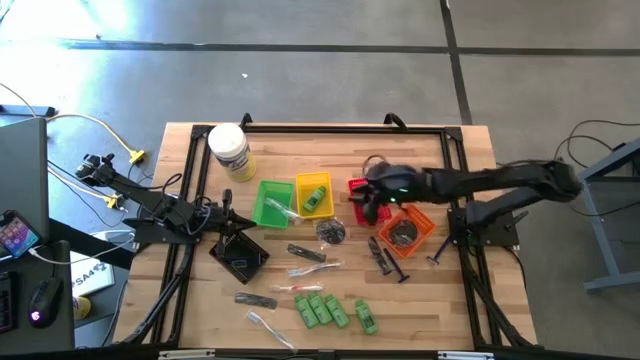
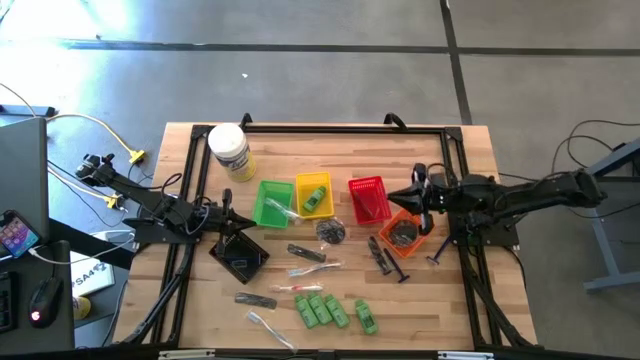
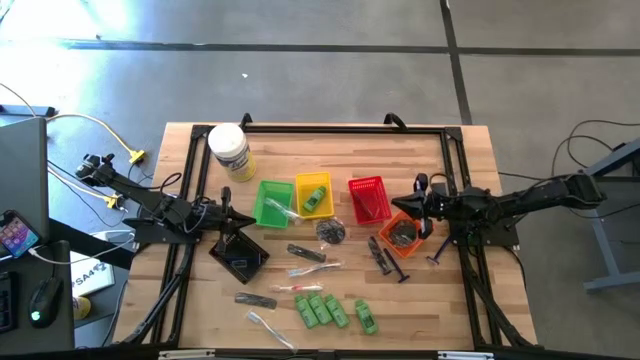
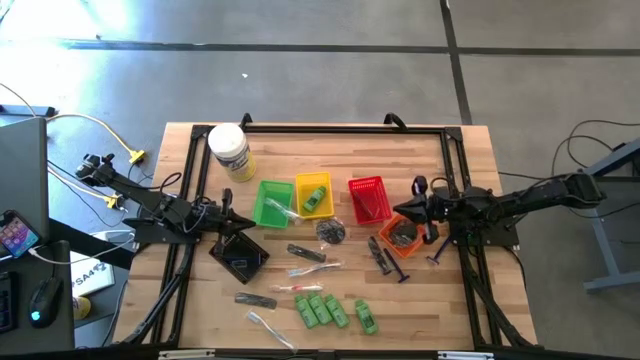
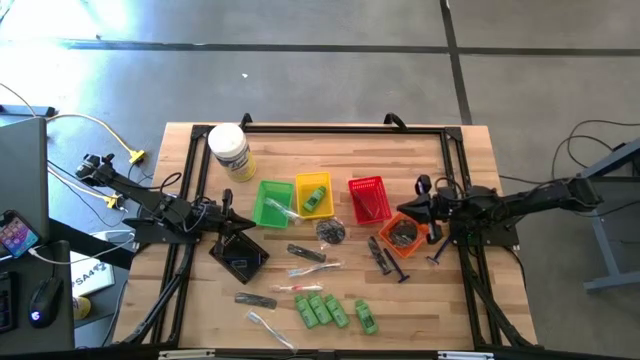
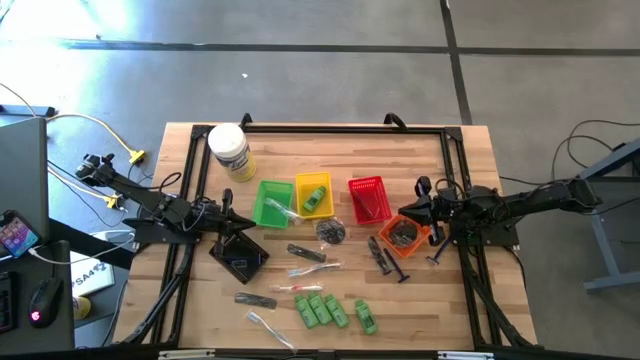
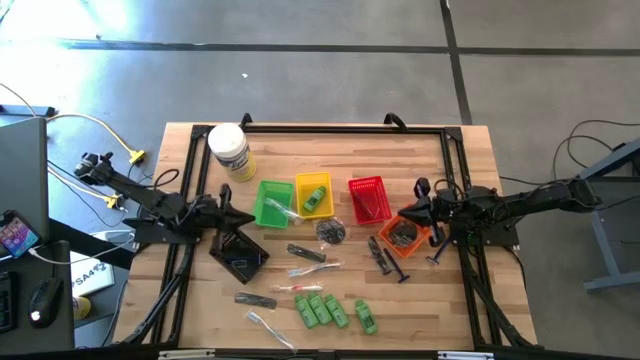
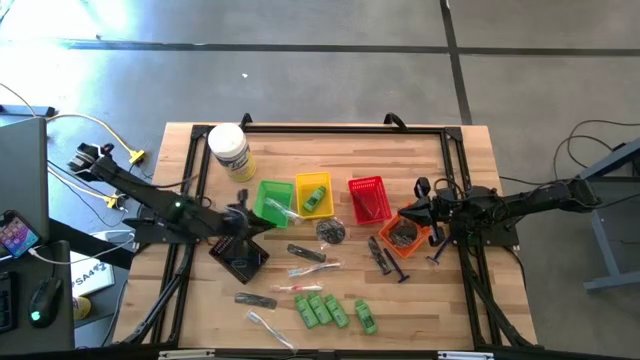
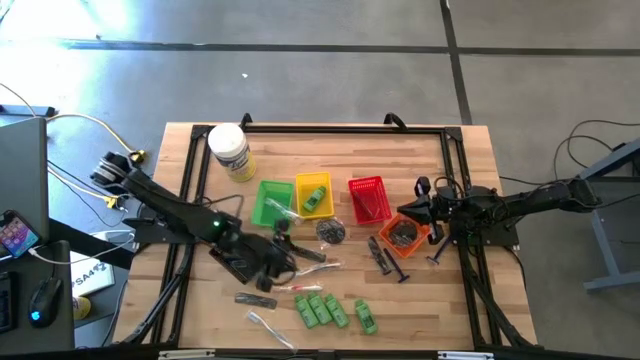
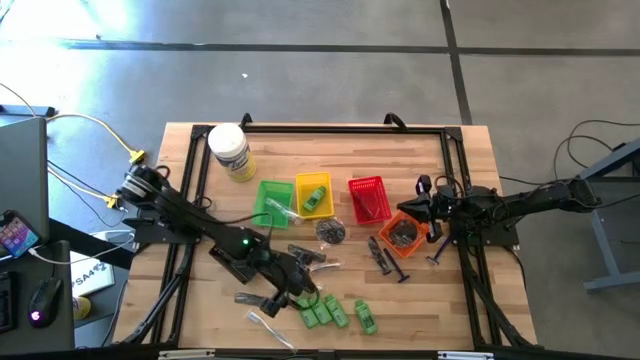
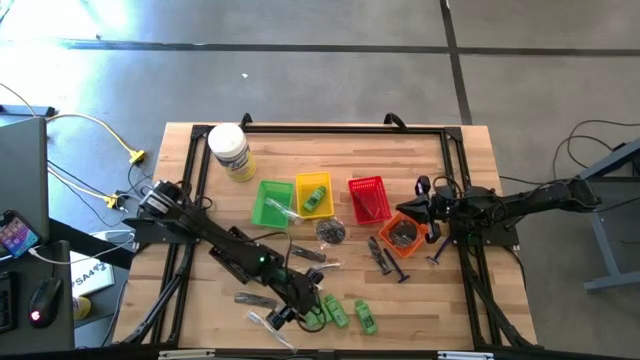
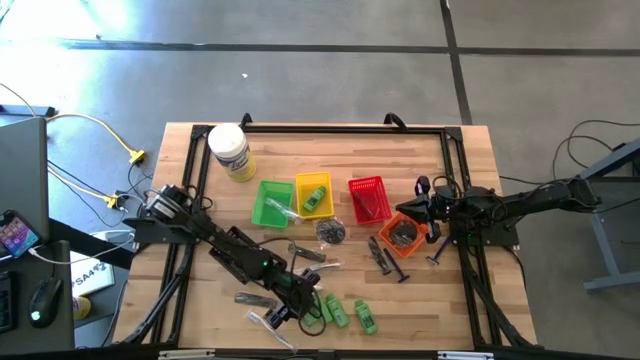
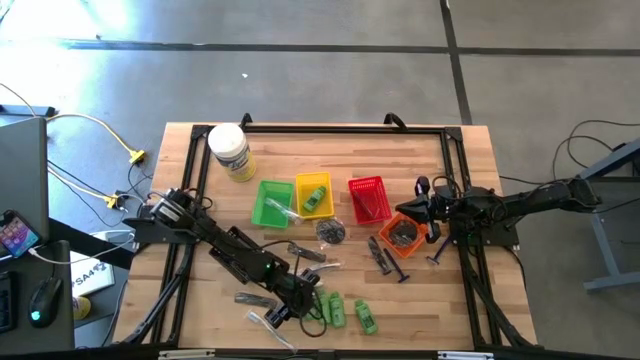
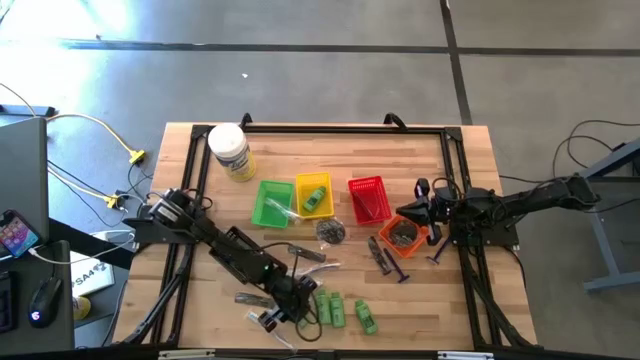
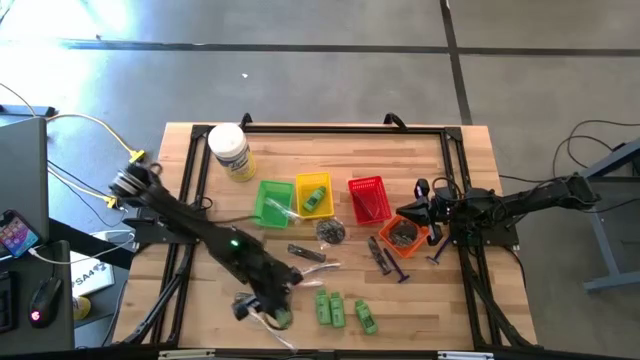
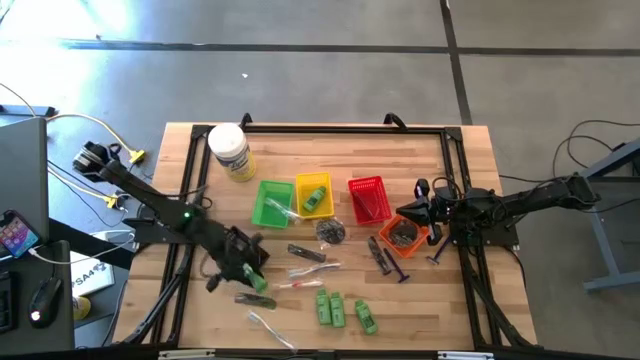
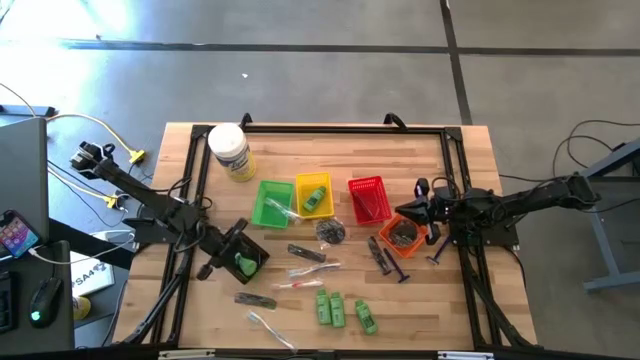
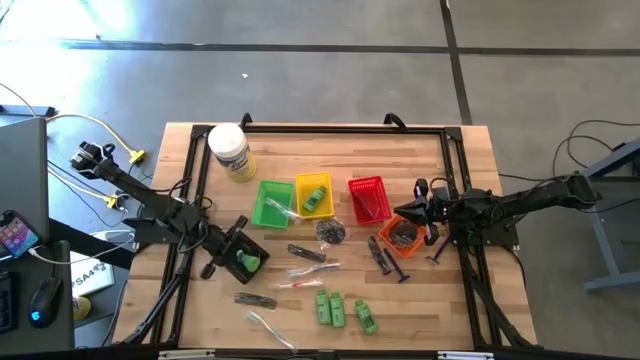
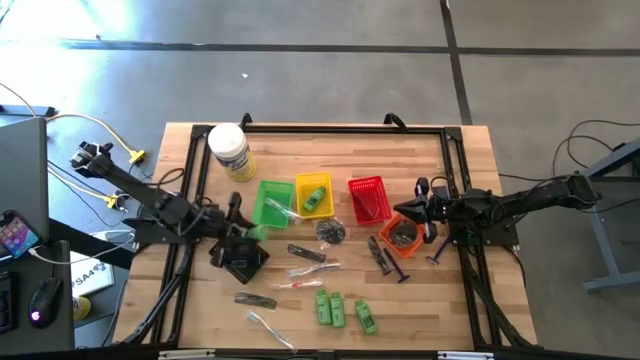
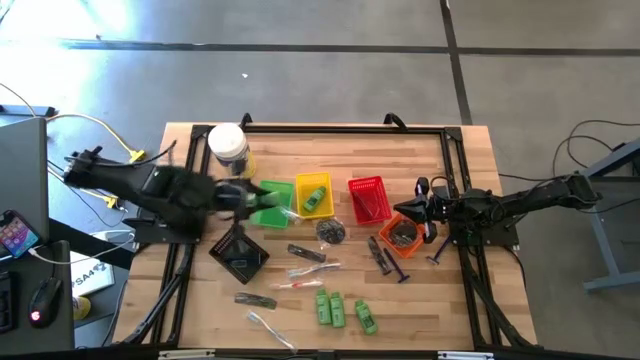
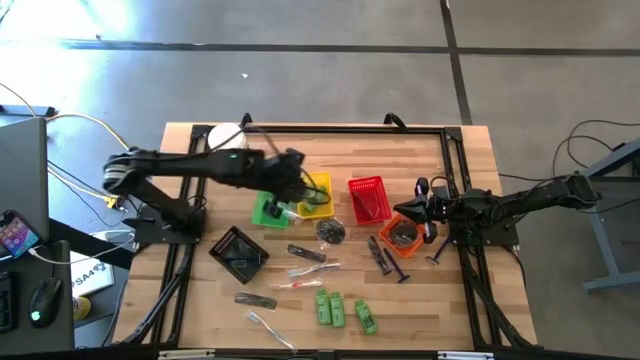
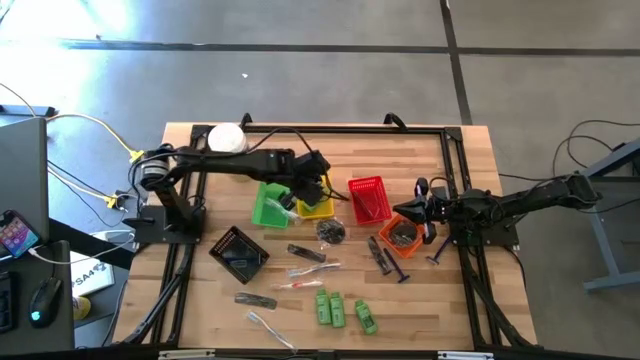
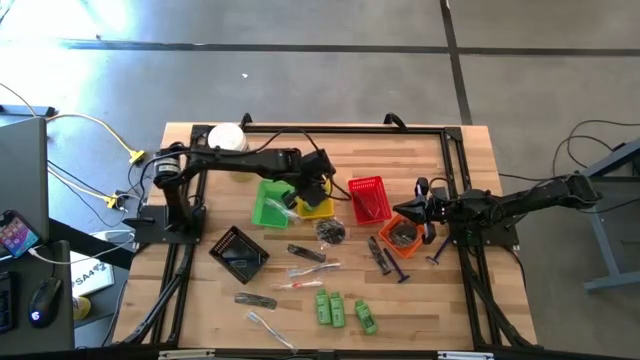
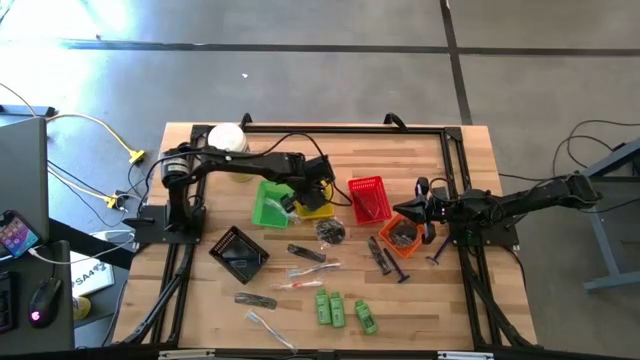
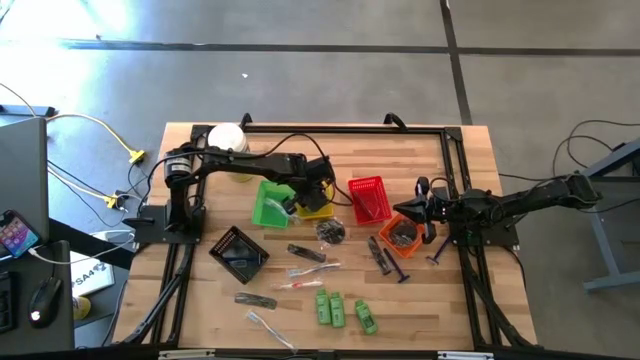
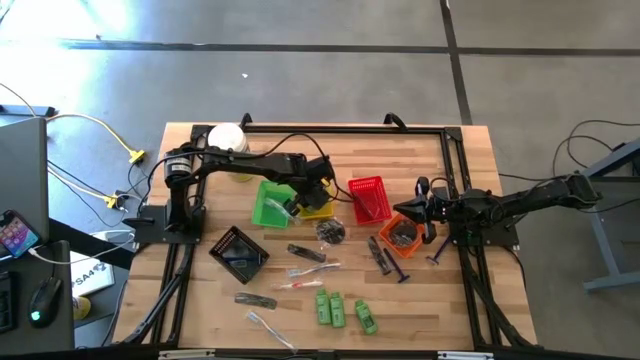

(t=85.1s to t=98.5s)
Task: Pick & Place Travel size toiletries
Put the green shampoo into yellow basket

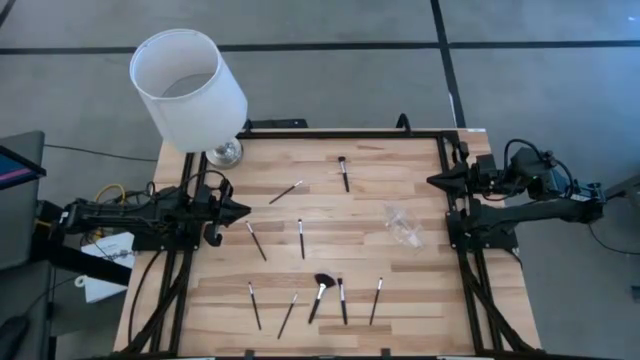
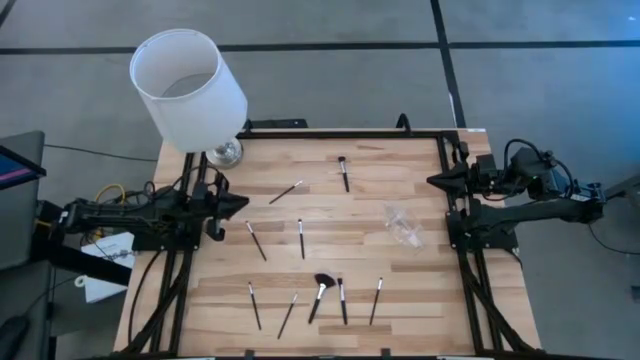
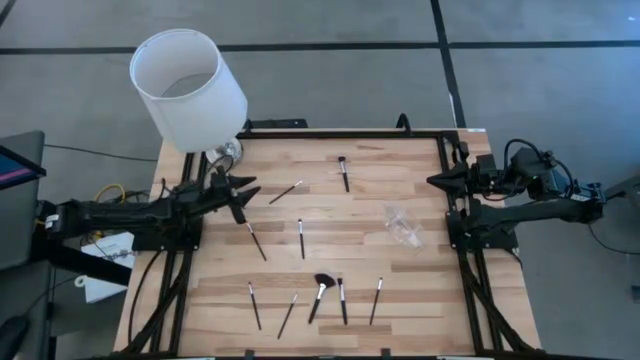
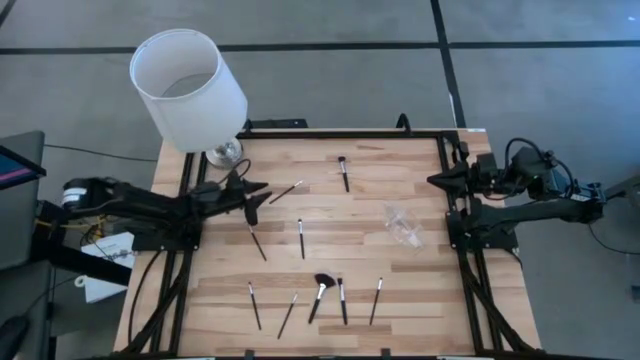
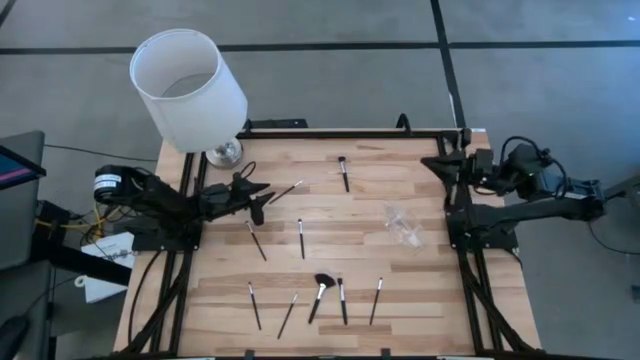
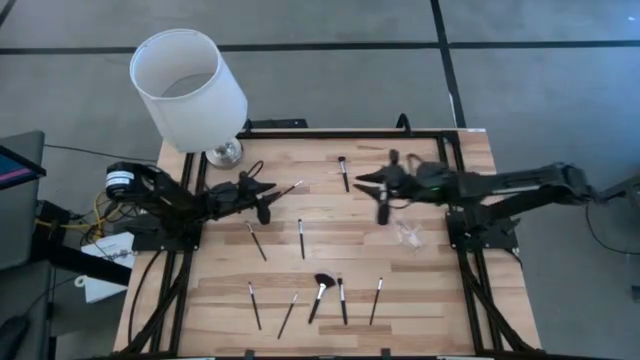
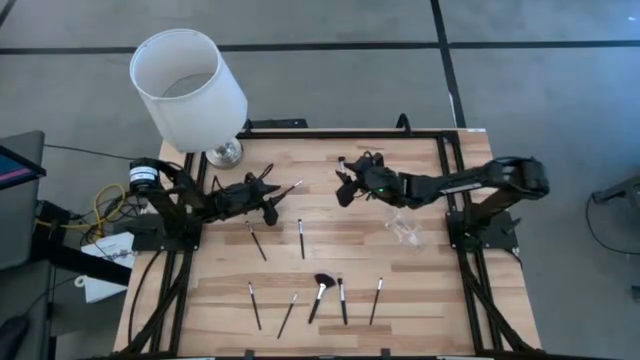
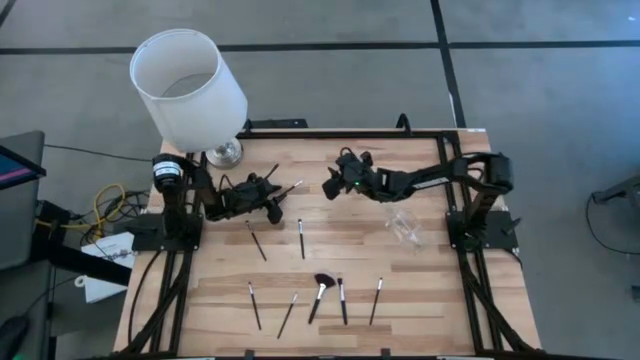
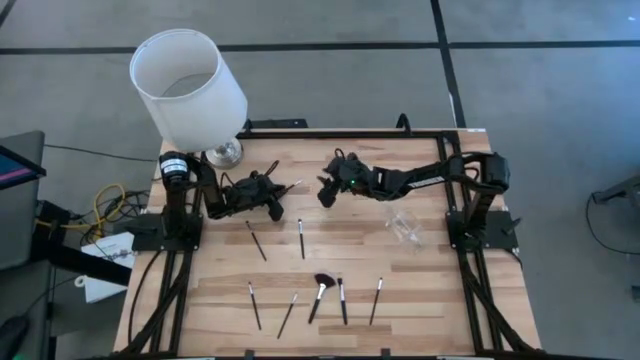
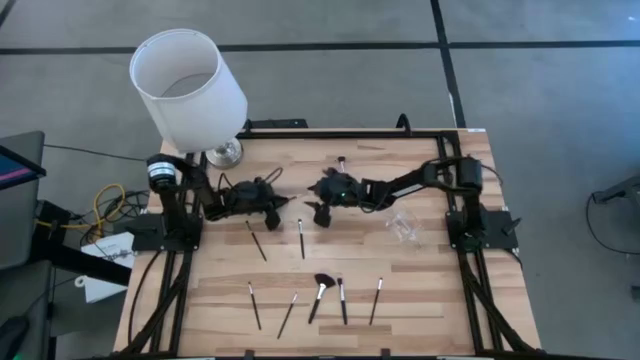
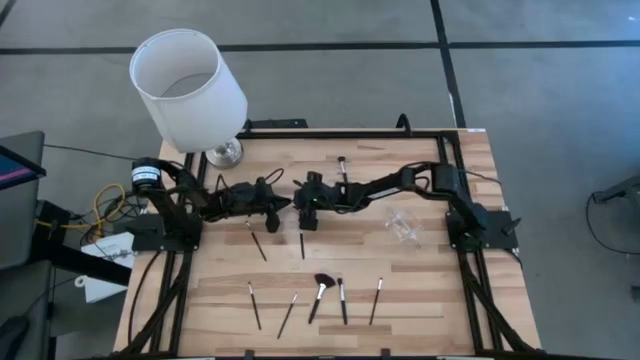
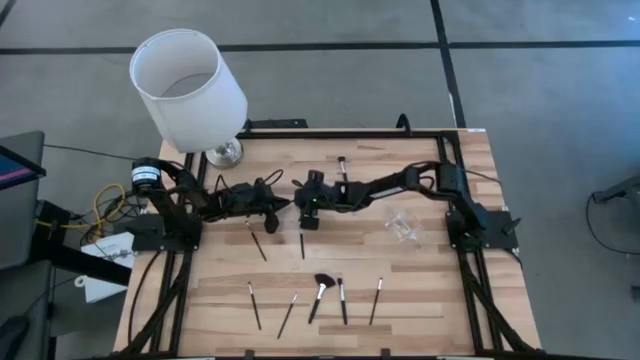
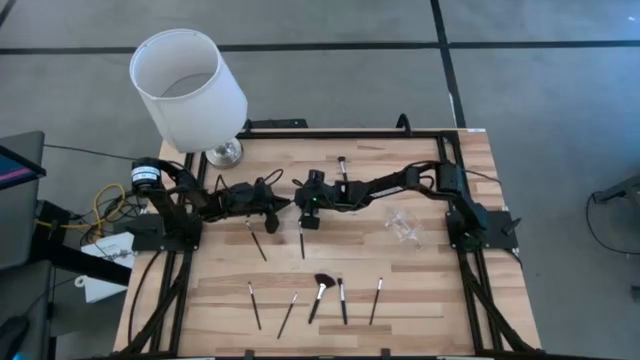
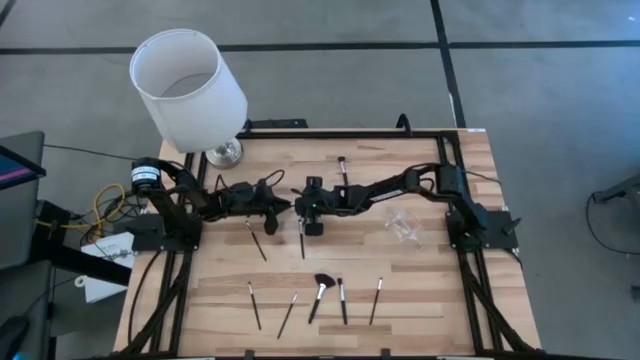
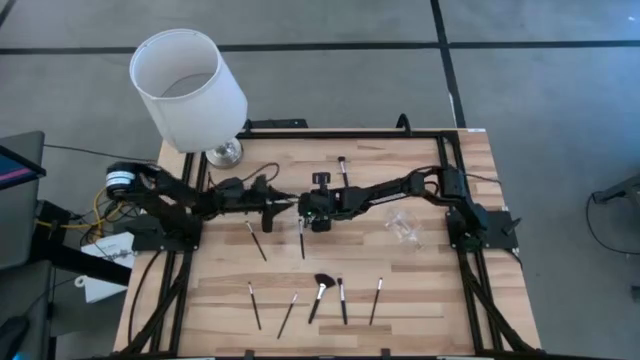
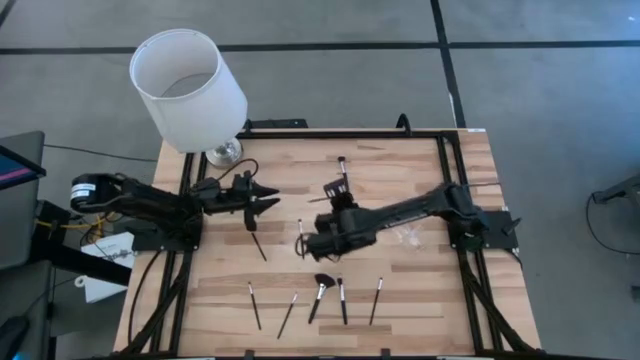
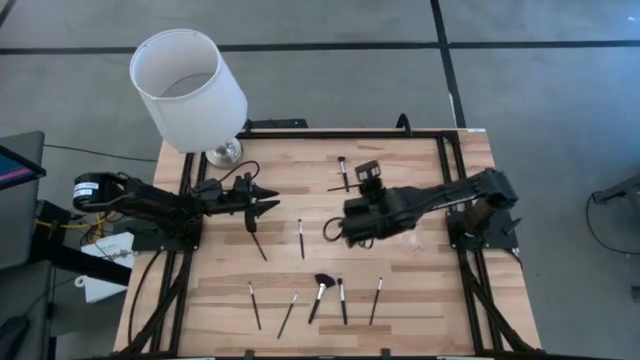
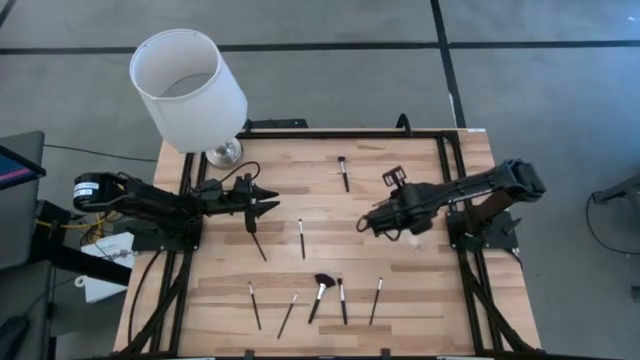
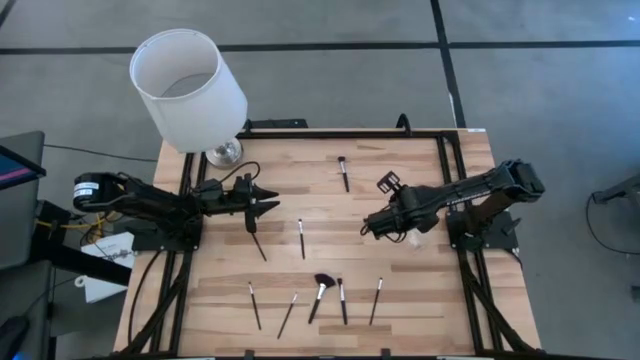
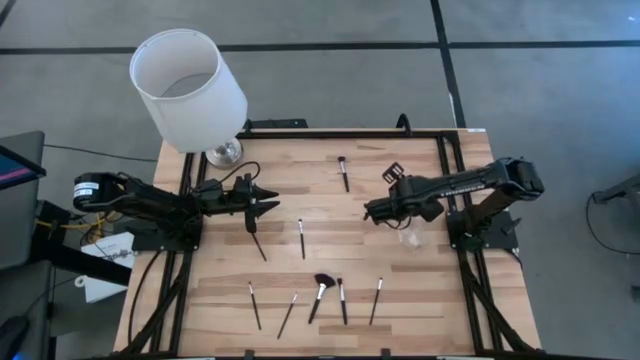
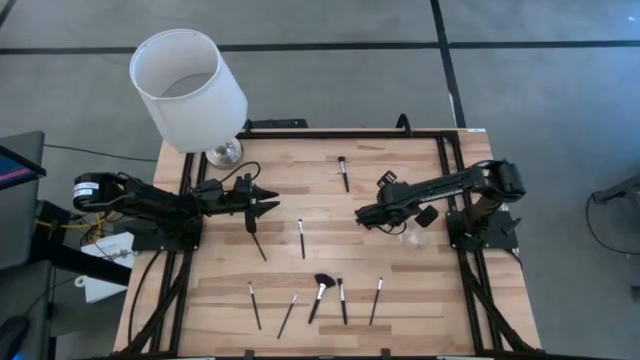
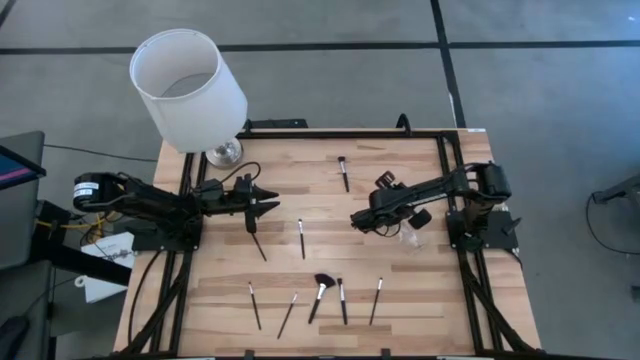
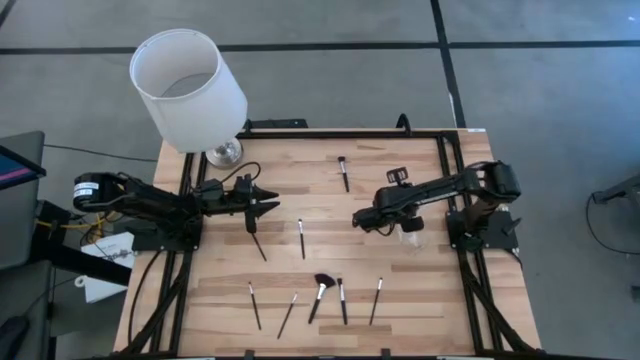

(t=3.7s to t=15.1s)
Task: Put items in baskets/containers
Put the eyeshadow brush into the transparent organizer
